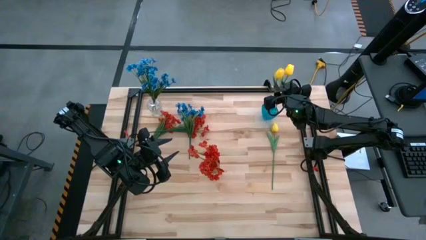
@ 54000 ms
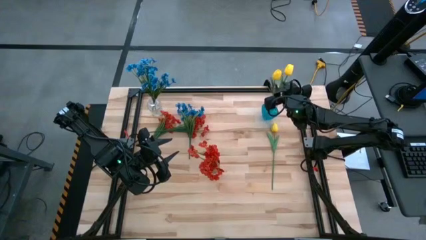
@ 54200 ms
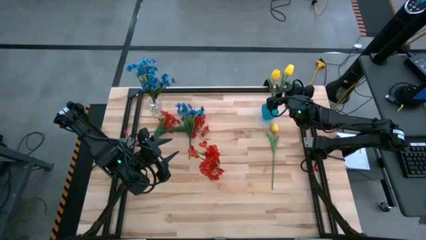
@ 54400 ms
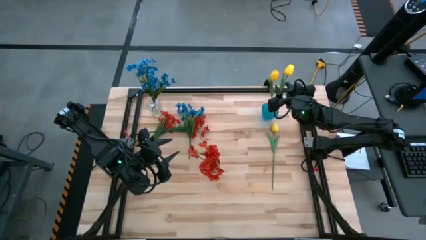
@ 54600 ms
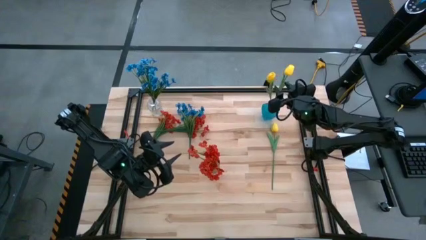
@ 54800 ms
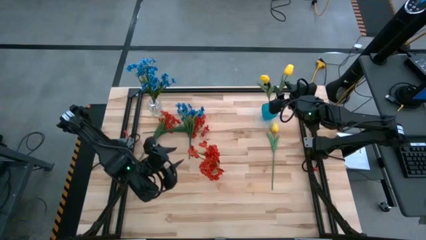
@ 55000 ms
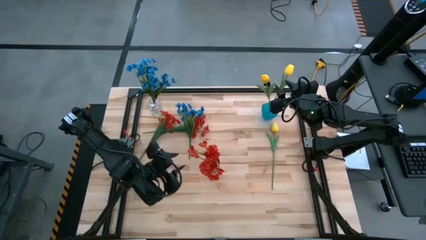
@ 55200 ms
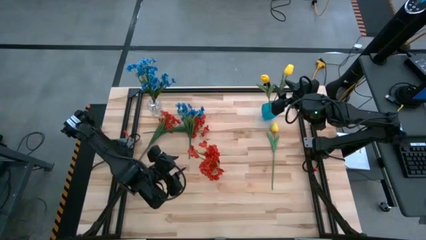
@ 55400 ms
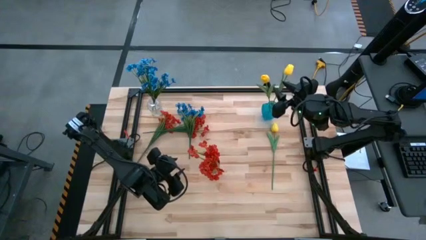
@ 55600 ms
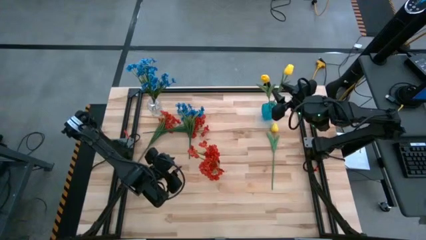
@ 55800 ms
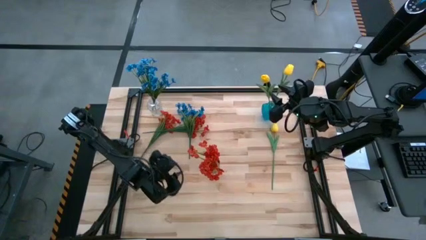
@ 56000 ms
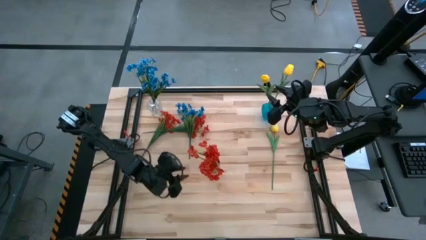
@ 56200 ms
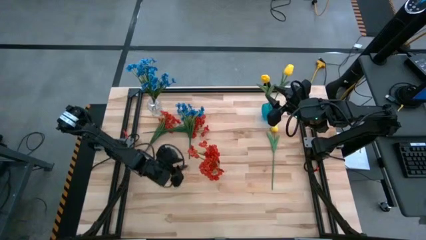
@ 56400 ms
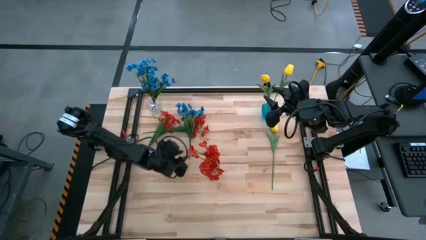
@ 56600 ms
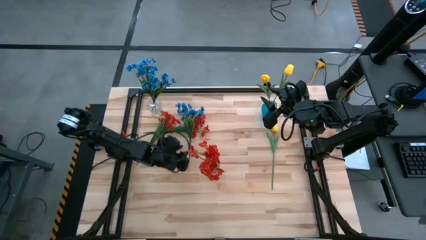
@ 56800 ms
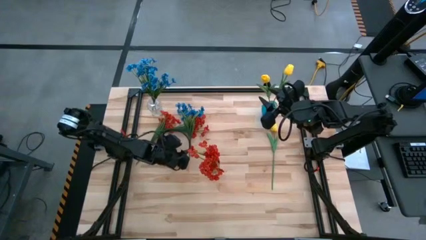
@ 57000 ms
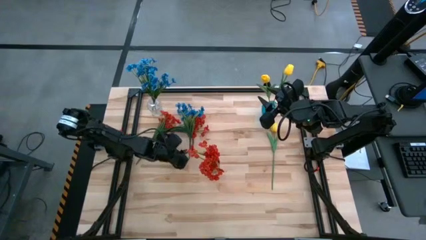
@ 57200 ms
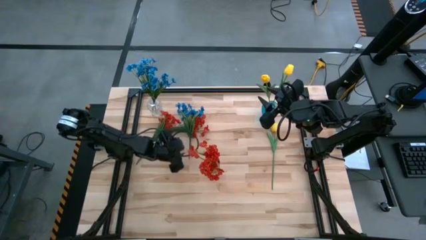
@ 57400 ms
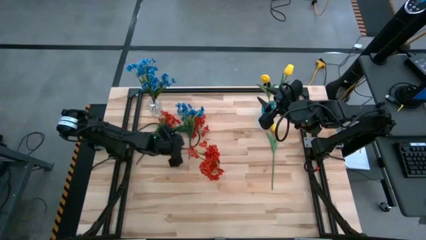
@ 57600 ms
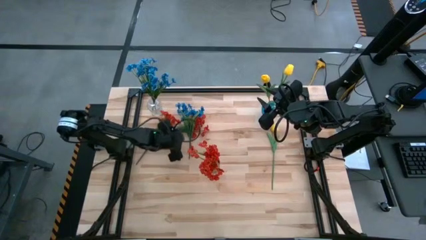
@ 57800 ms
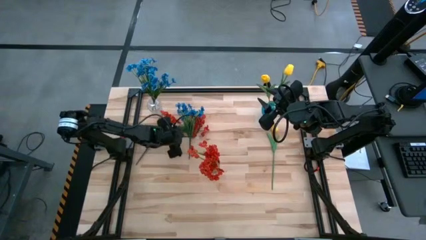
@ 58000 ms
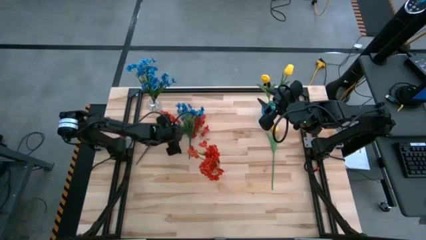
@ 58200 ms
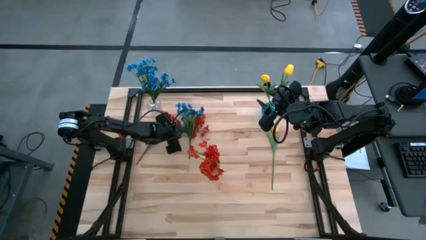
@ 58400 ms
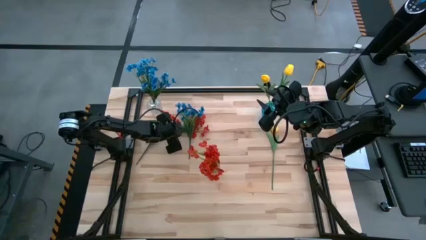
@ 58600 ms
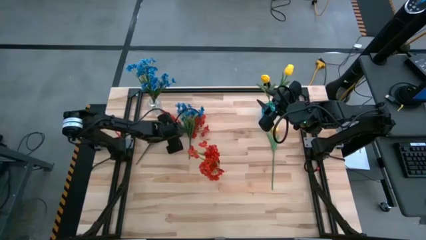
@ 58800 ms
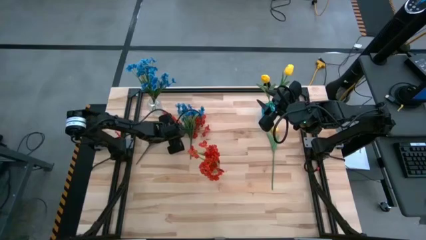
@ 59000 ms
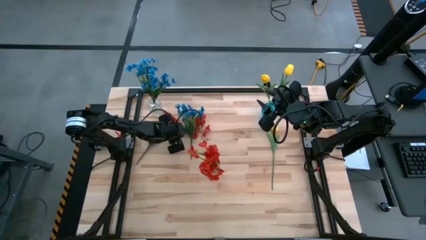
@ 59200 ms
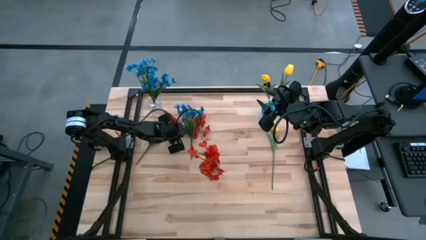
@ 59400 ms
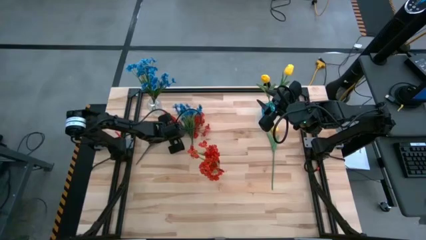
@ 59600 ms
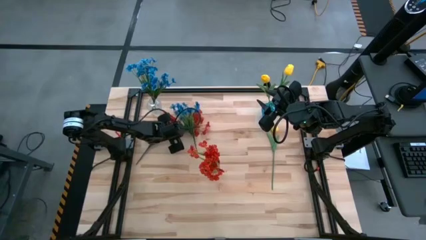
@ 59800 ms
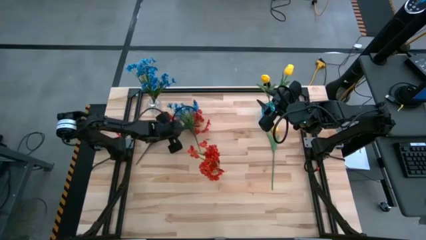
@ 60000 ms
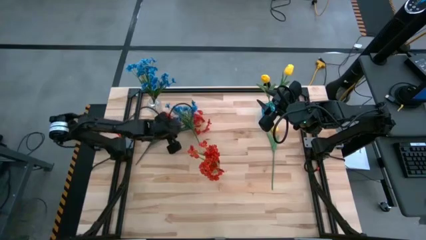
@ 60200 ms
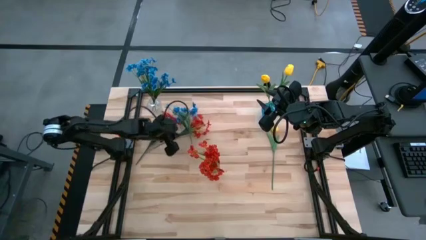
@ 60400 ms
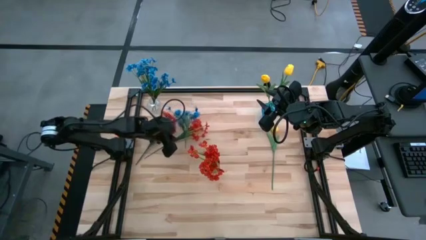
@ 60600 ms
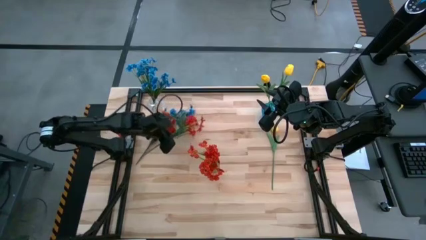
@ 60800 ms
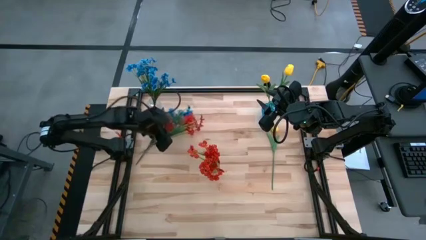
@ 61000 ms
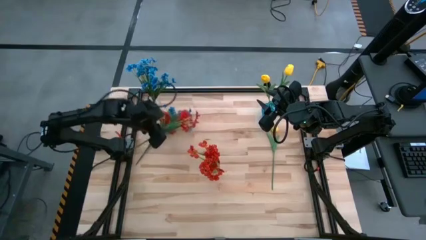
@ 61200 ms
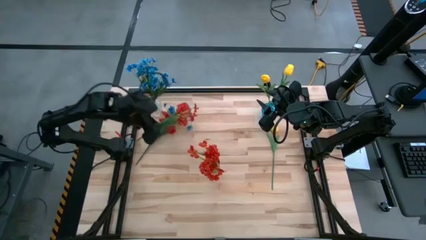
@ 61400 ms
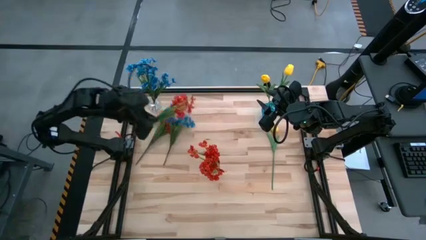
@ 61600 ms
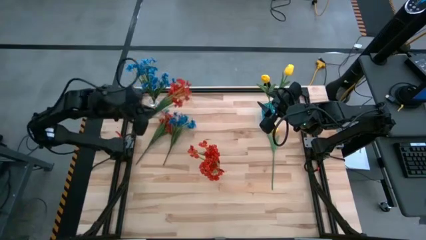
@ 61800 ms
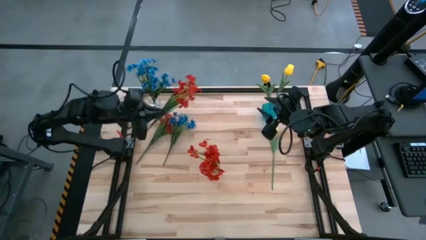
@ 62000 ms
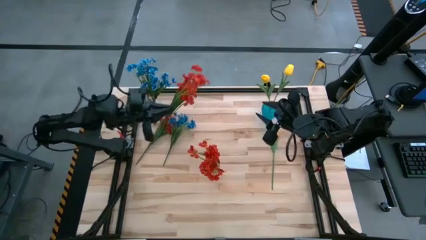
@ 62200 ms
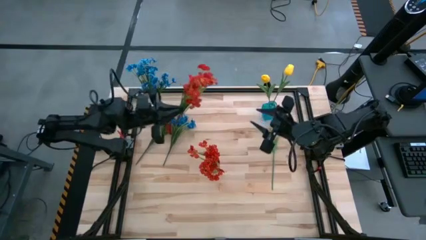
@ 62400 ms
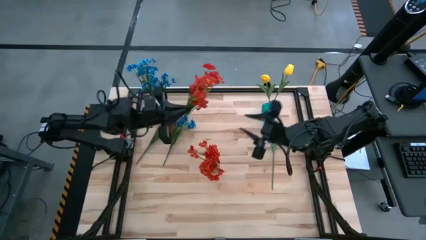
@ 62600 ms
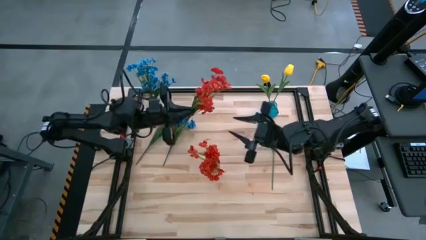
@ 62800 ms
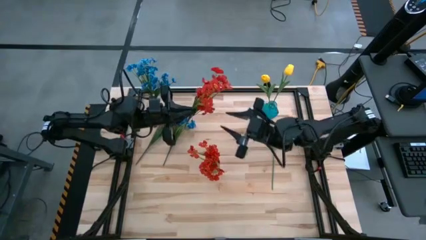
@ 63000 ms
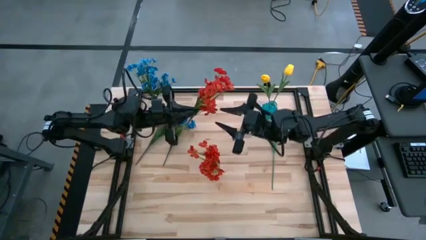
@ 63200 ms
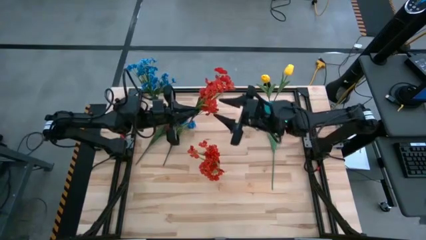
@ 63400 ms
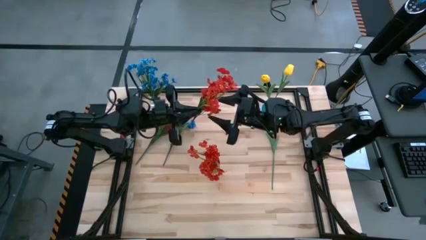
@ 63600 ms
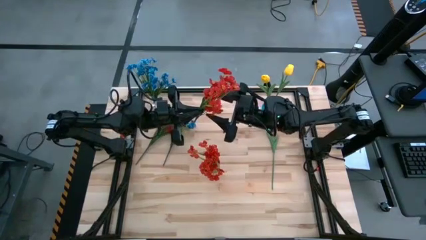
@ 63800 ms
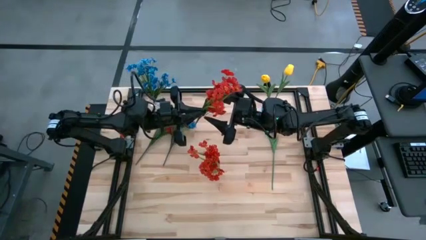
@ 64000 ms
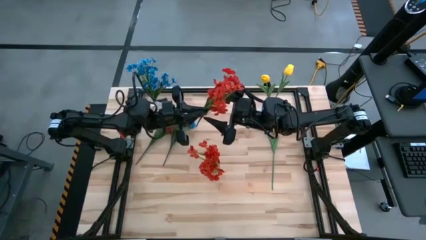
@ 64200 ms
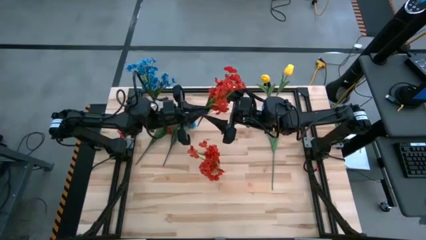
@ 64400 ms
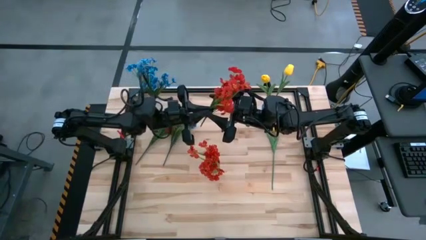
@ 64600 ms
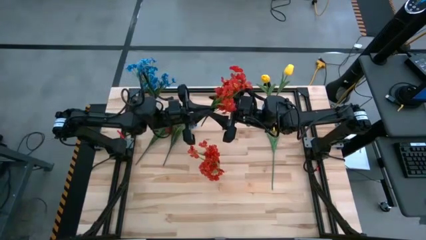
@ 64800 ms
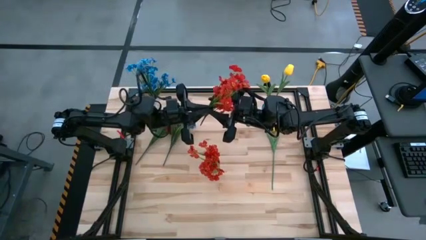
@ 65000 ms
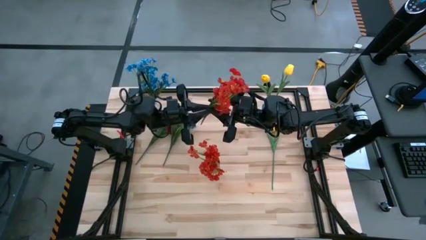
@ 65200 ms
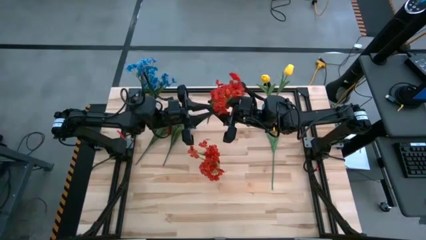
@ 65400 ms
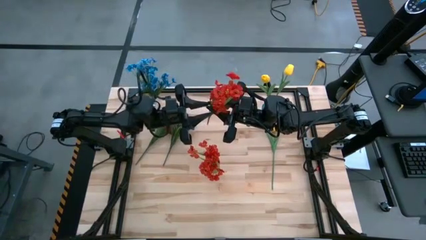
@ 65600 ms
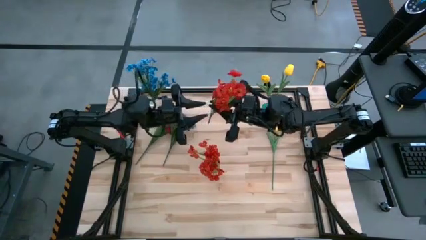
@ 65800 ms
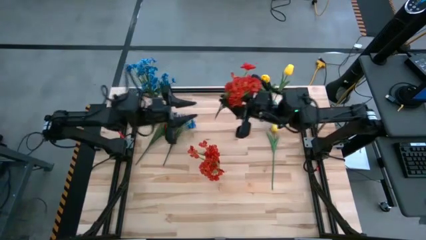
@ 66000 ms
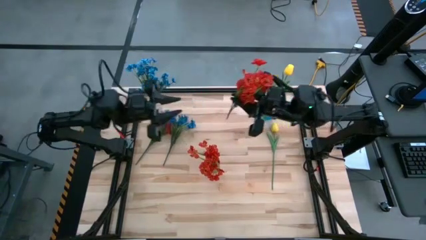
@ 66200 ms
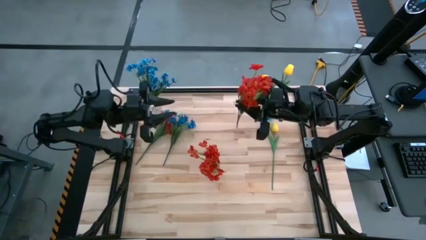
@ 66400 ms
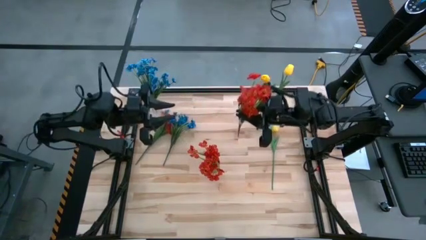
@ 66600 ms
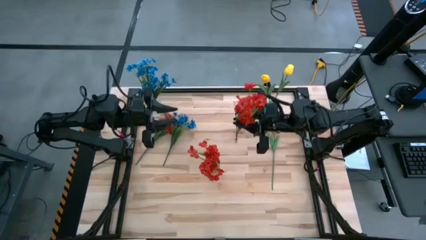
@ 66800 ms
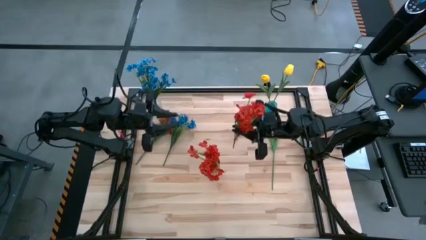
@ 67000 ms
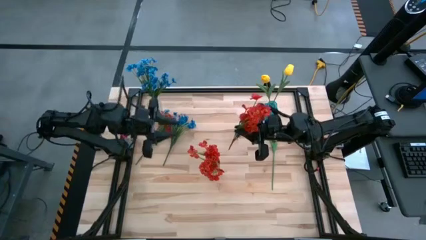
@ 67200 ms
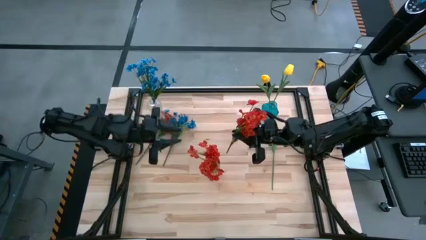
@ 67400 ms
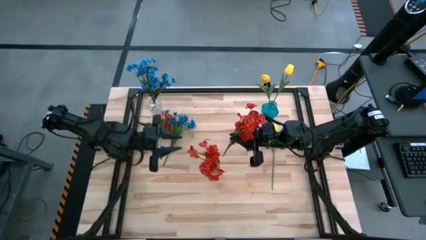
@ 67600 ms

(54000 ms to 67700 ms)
Task: Sort flowers into vase by color
Put the right red flowers into the red vase
